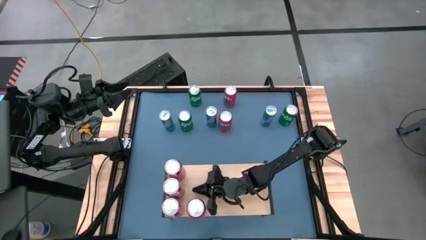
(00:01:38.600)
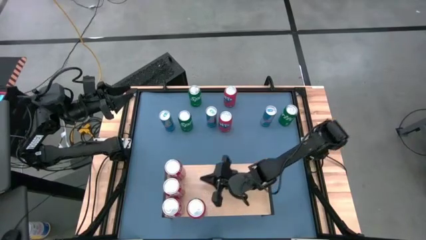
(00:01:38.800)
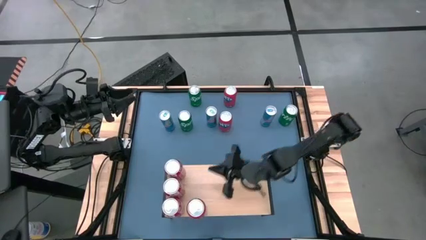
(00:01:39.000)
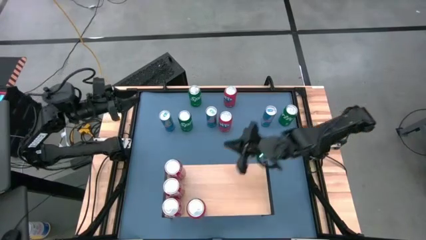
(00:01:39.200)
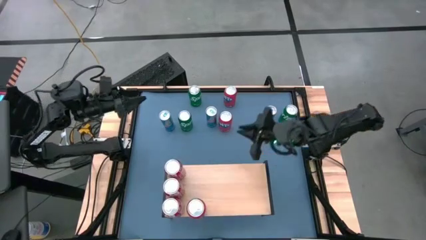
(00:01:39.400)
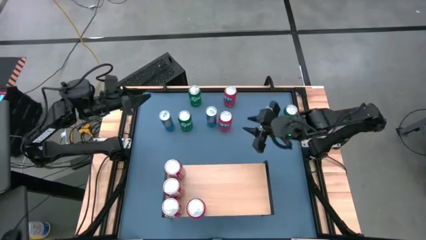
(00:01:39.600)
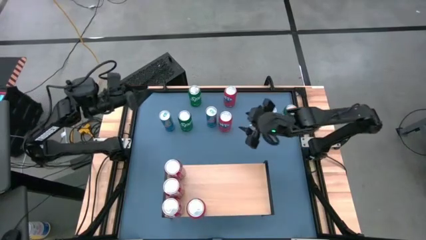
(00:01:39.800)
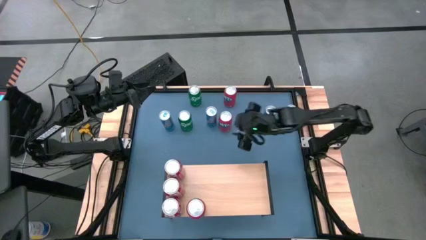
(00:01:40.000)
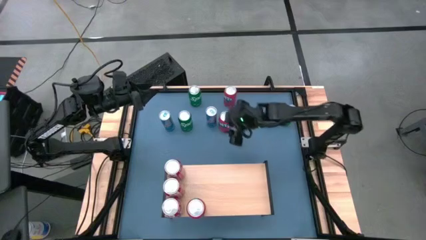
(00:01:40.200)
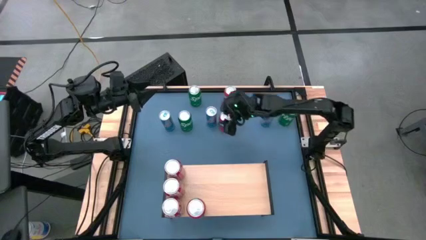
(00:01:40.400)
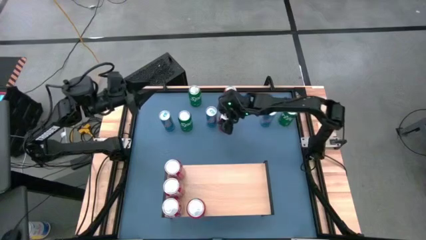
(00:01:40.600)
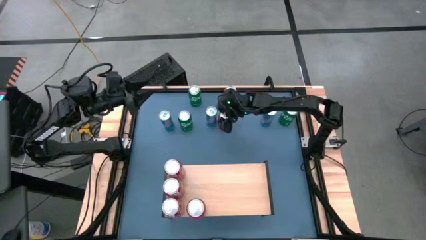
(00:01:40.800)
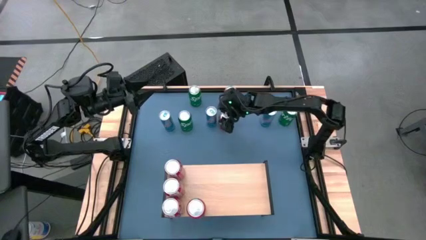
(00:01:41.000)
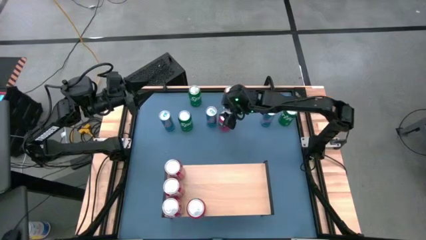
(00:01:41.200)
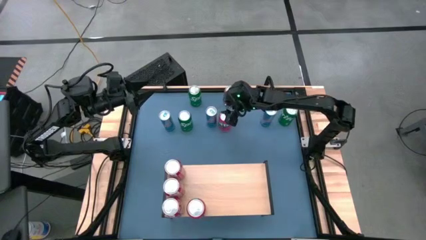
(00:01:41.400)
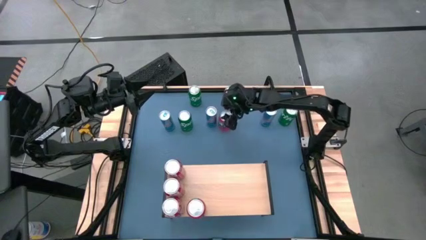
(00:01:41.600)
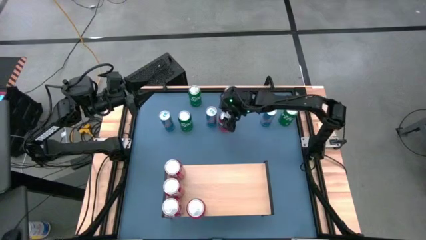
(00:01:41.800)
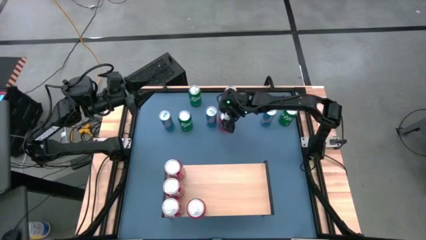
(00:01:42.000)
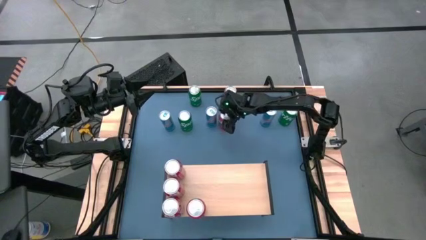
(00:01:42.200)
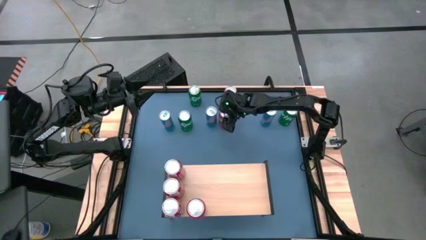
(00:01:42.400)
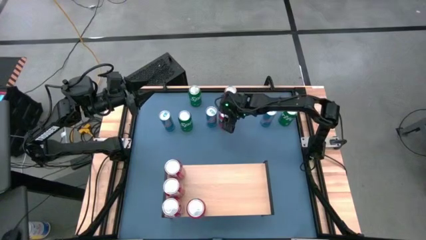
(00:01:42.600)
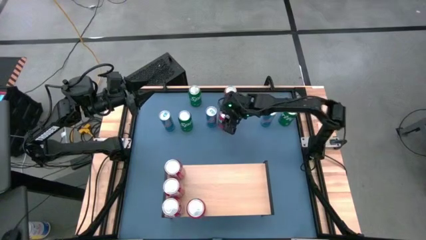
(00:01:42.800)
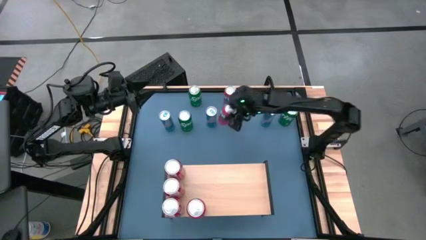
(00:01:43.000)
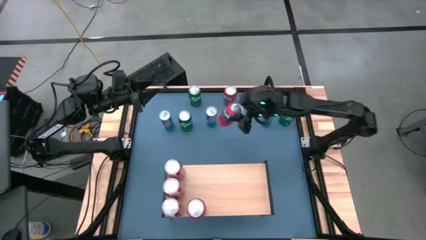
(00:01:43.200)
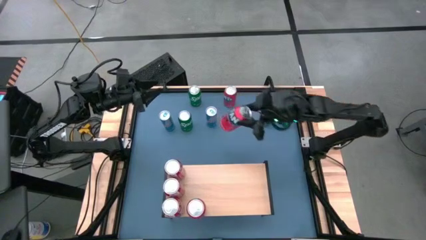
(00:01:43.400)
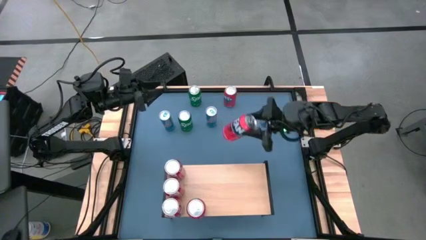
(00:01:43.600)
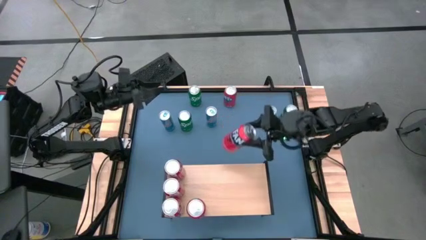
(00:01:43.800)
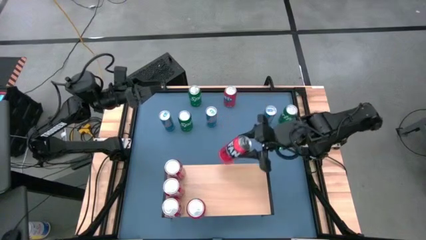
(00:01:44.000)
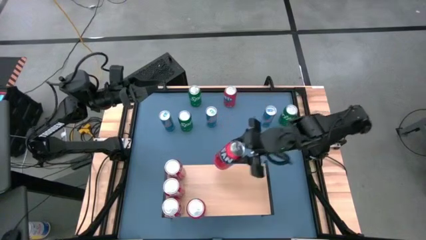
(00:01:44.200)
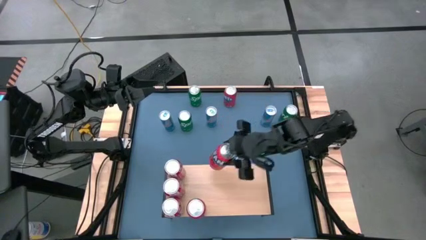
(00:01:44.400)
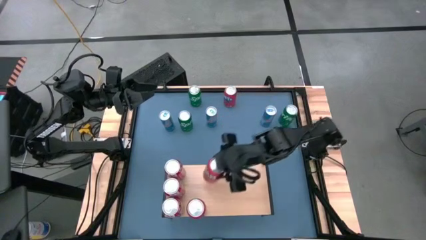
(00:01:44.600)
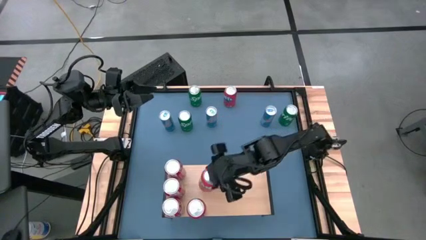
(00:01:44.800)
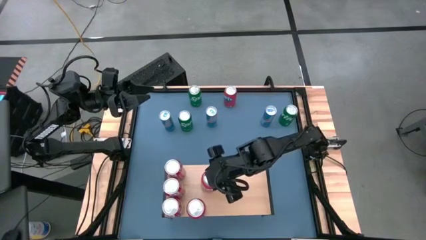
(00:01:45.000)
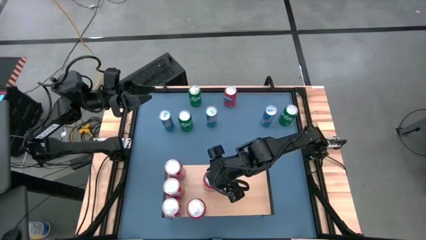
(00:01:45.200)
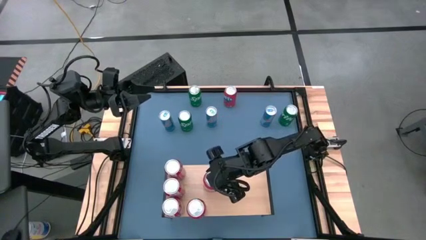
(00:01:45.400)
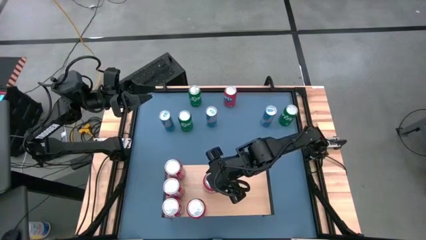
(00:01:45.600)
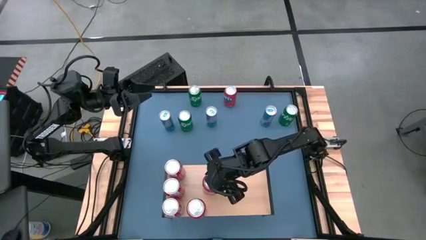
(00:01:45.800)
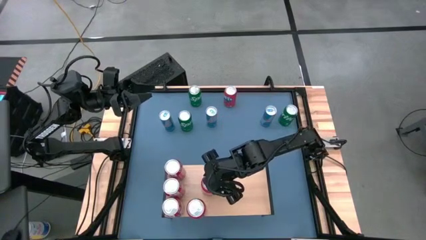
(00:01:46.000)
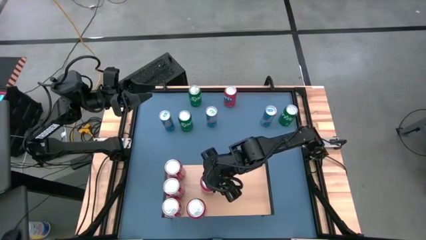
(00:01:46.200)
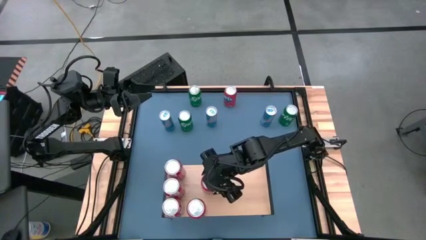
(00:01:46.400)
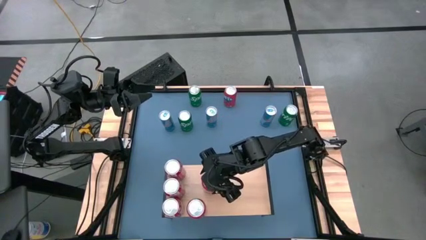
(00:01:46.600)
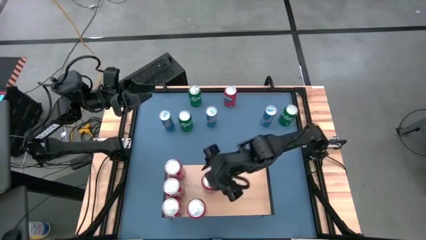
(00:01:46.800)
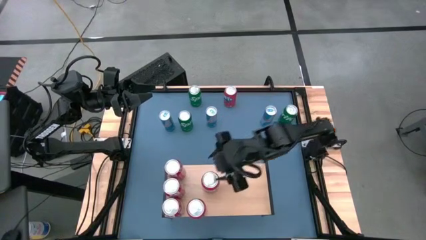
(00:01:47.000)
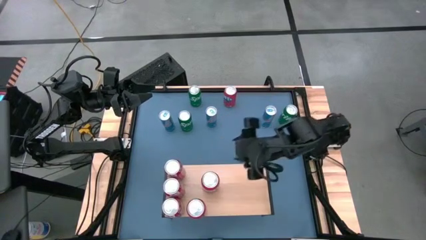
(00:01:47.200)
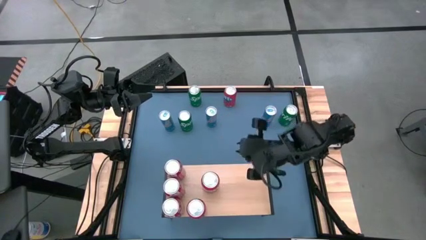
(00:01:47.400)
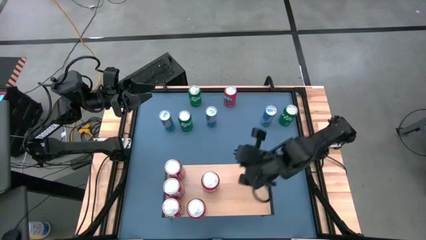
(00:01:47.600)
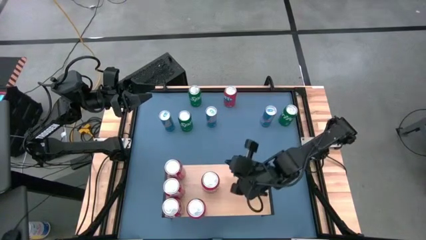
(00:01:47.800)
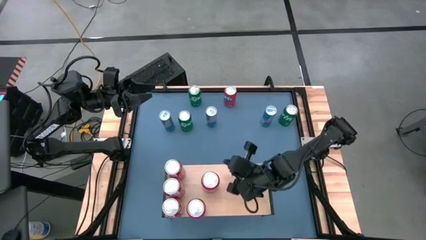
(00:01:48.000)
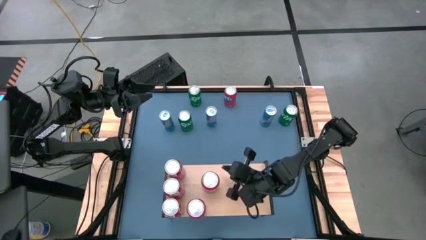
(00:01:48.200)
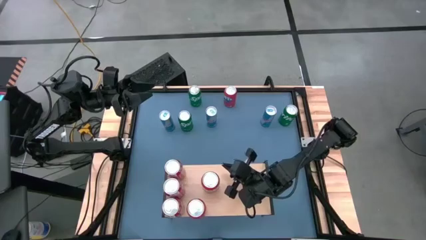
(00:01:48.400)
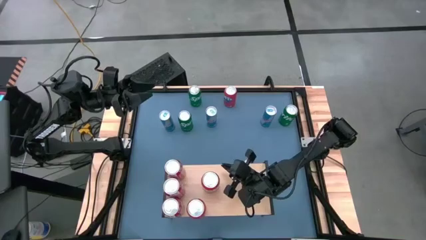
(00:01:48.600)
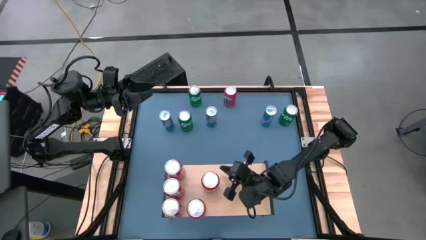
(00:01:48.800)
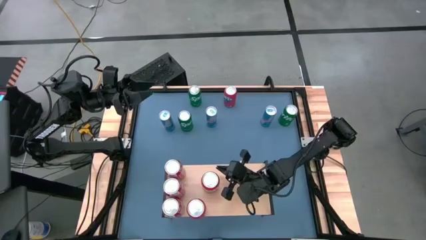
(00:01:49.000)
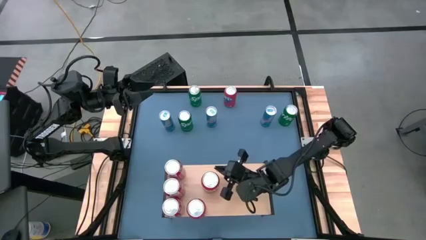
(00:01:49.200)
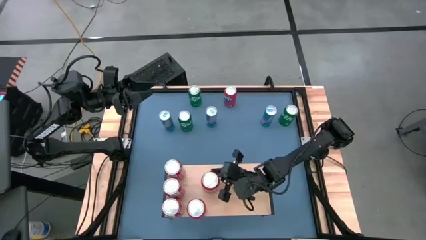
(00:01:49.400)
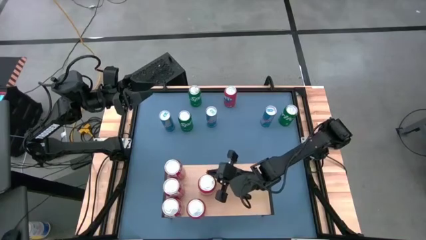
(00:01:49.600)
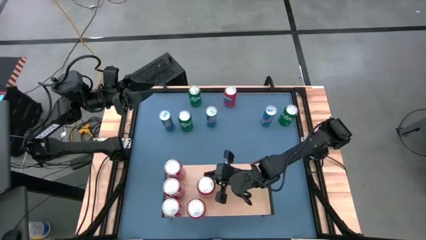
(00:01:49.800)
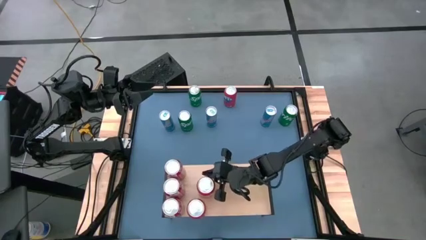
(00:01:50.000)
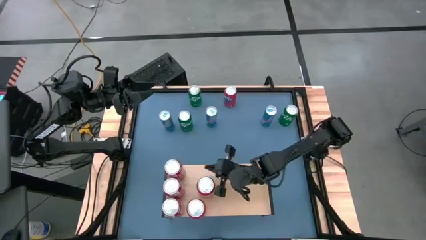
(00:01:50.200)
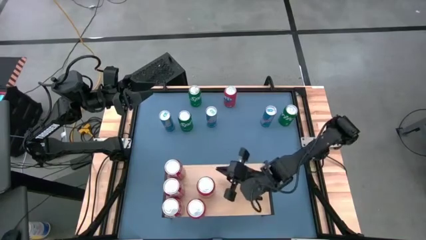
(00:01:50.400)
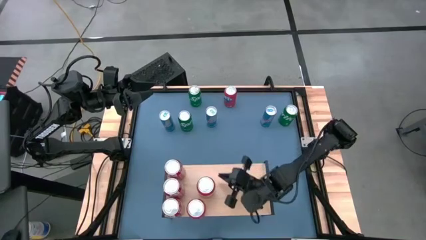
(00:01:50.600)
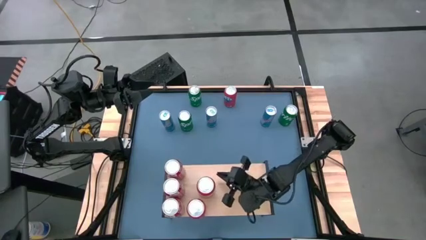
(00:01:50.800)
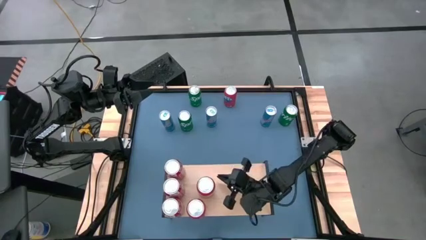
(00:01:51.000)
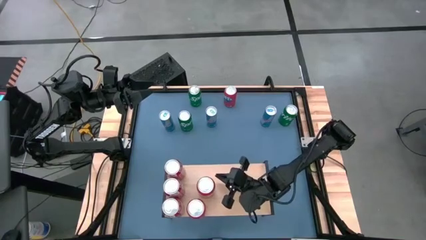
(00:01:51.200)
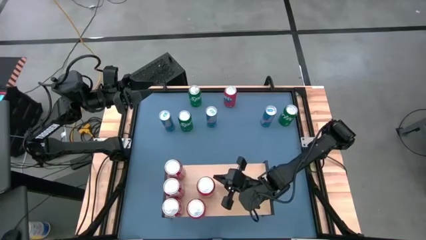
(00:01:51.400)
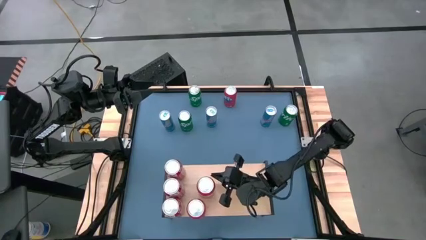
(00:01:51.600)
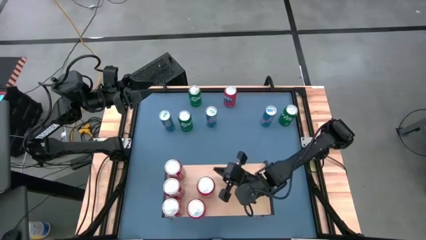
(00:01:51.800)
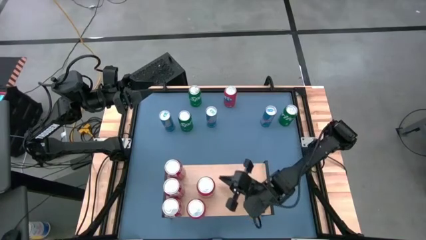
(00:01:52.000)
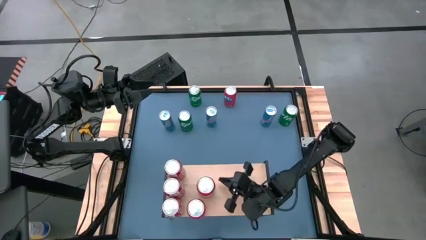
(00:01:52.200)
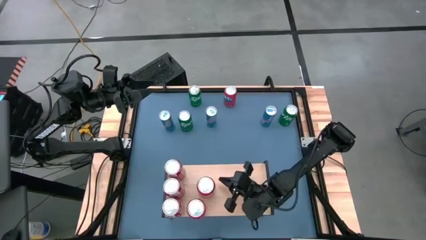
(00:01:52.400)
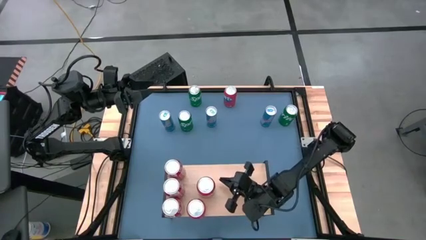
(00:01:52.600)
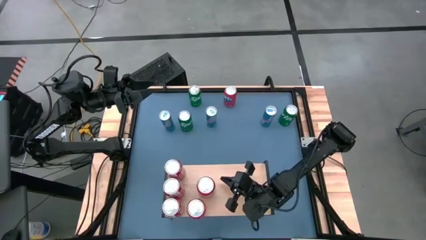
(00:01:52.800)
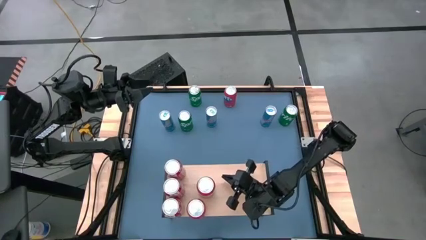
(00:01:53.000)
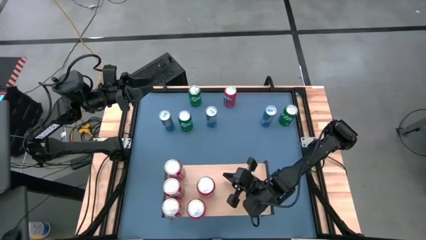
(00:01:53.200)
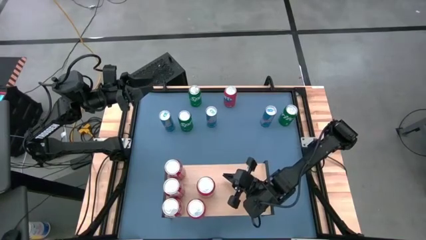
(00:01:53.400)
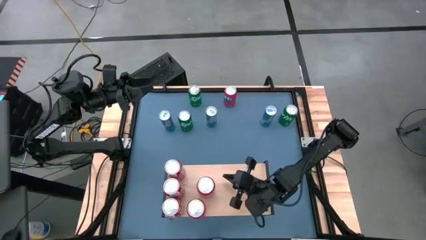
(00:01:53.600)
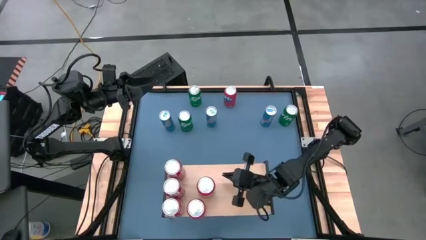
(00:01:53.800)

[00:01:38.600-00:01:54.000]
Task: Place canned beverage on shelf
Put the bottom orange soda can on the shelf aligned with the other orange soda can
